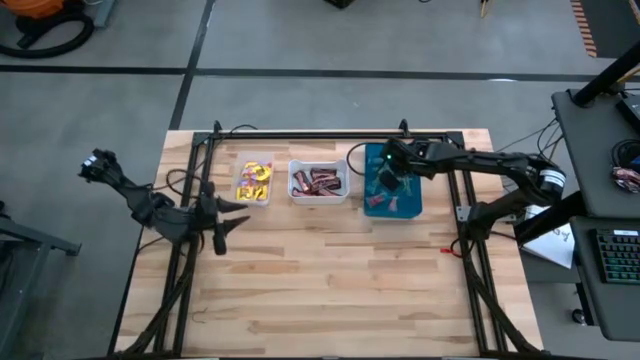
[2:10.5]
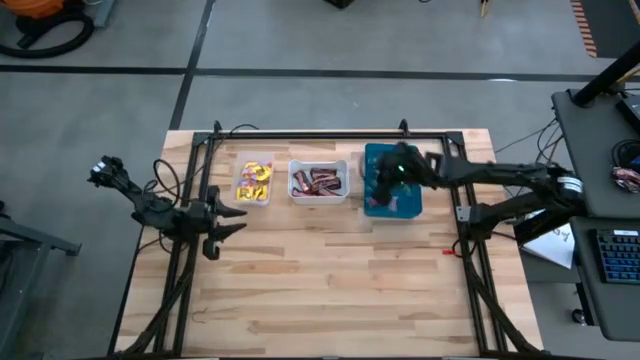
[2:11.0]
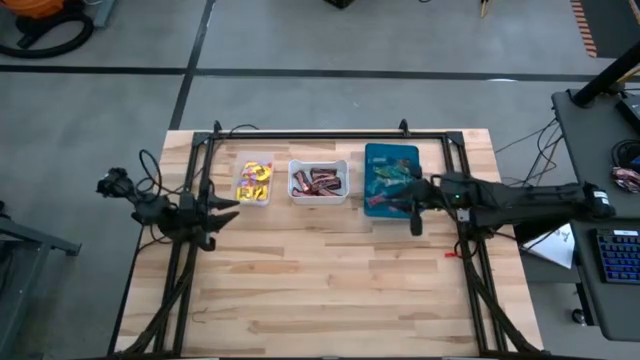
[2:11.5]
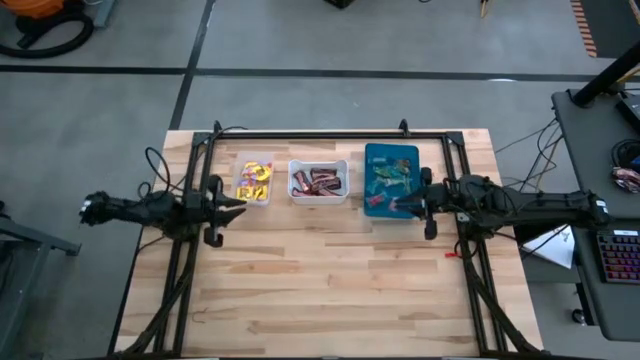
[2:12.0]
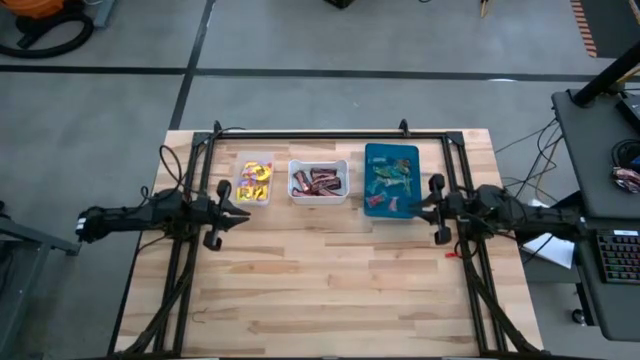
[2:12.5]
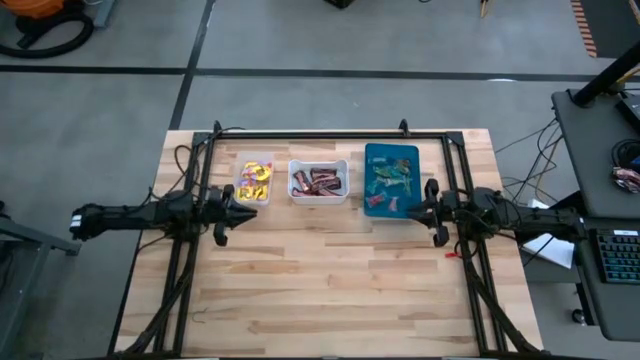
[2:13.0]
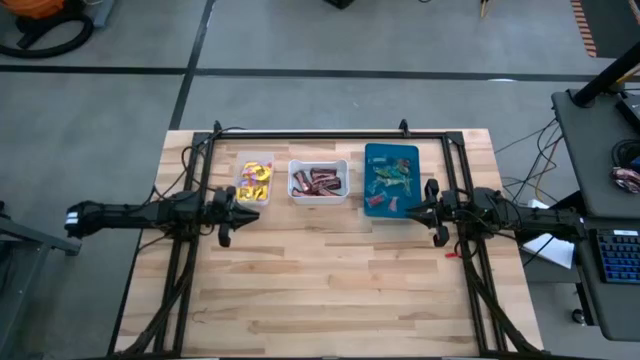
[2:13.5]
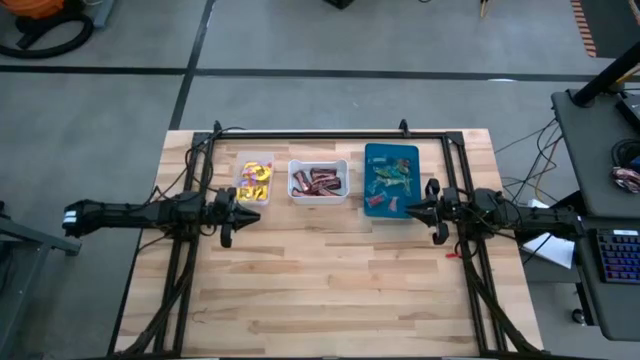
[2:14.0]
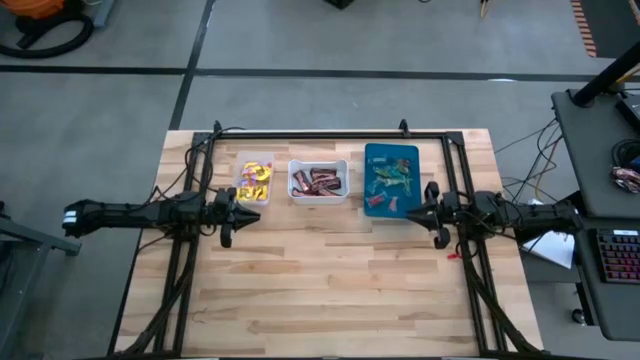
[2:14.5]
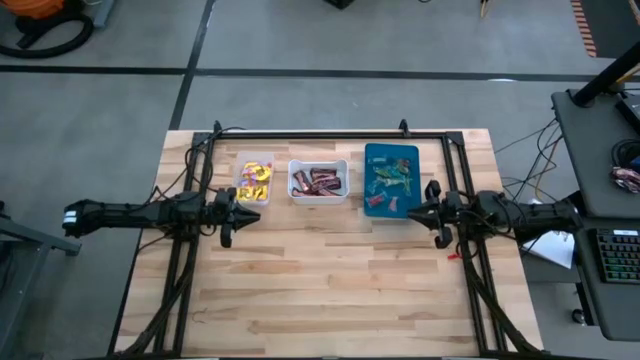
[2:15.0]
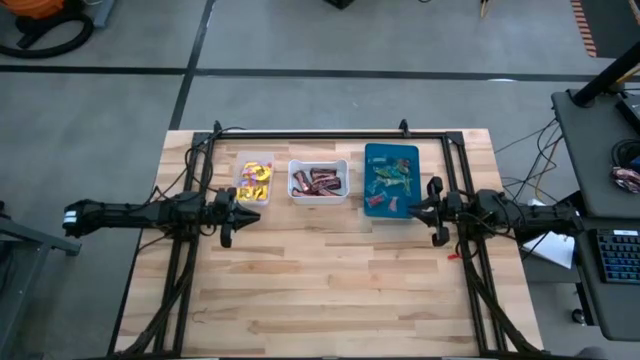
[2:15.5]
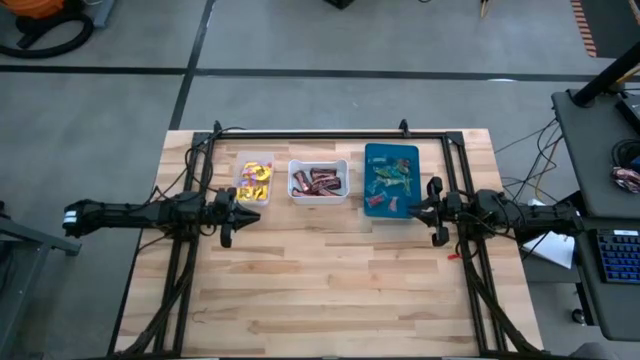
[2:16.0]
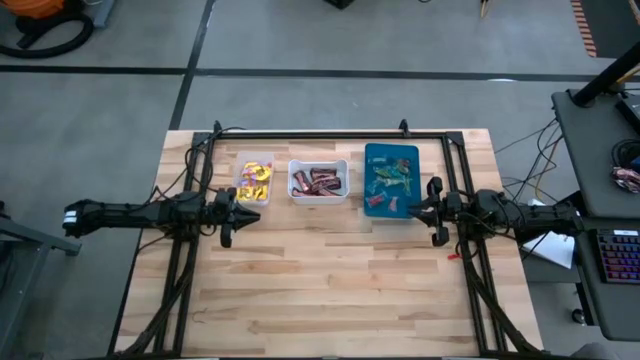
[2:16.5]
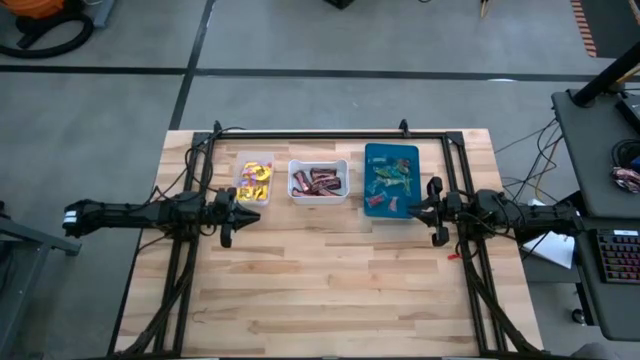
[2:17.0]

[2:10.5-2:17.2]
Task: Sort candy
Return to Home Position

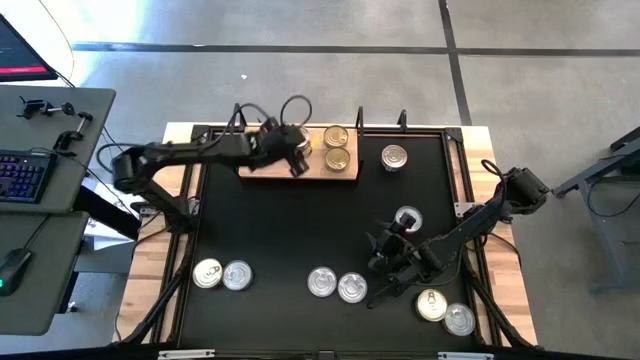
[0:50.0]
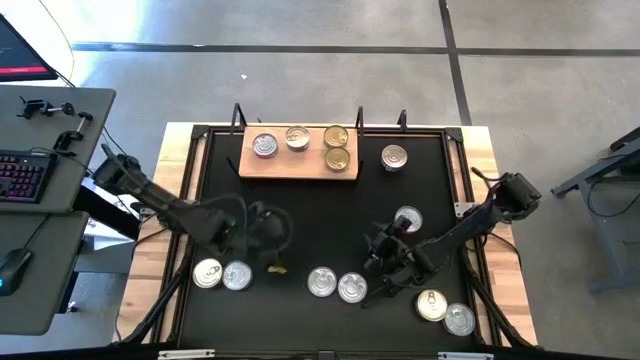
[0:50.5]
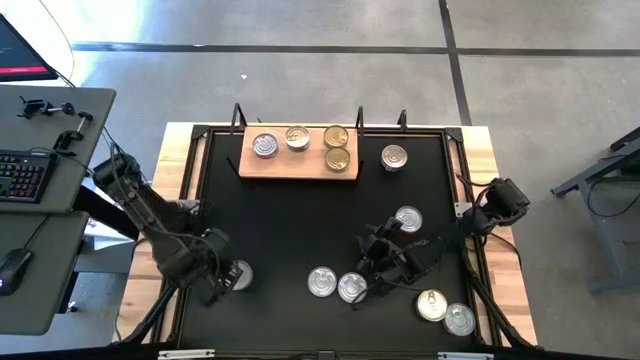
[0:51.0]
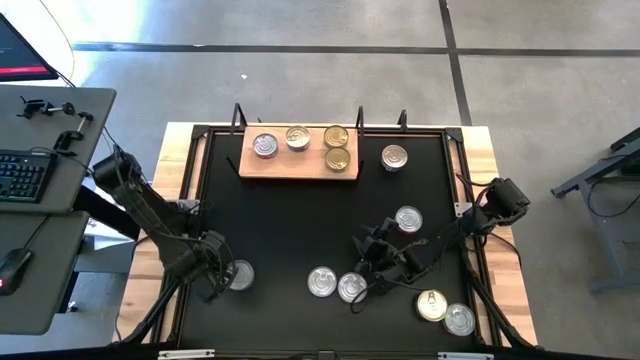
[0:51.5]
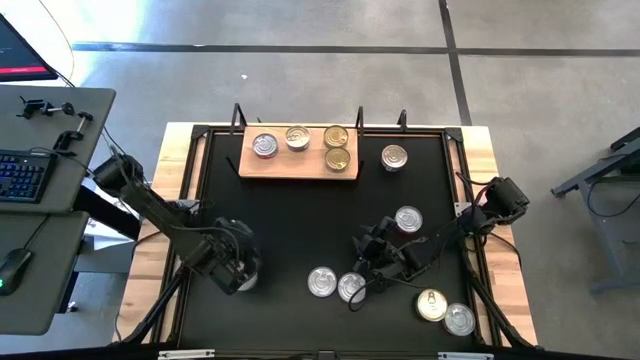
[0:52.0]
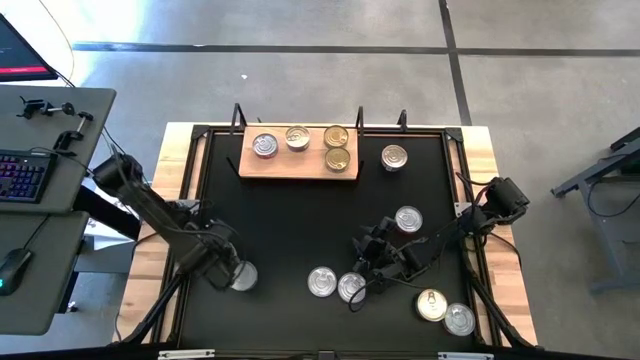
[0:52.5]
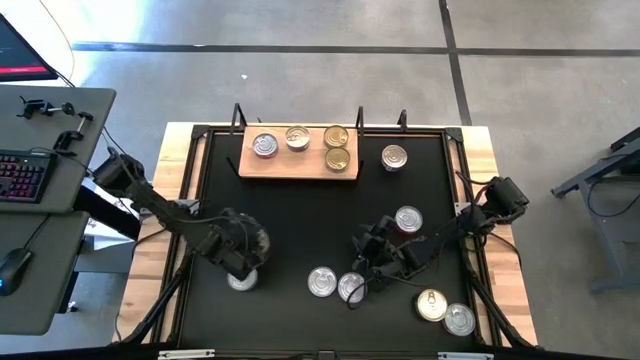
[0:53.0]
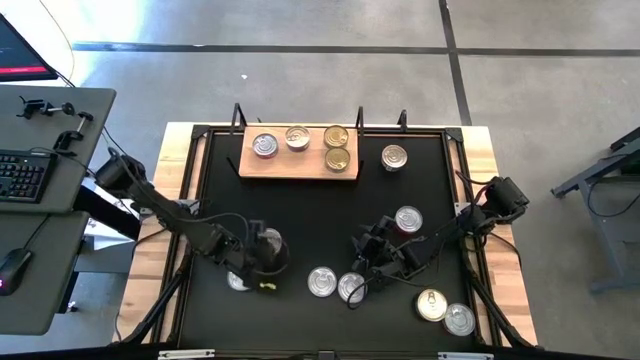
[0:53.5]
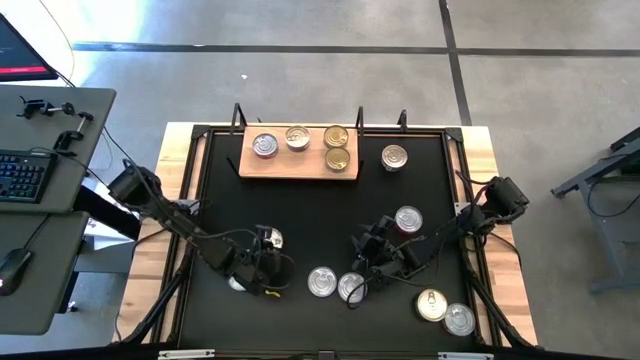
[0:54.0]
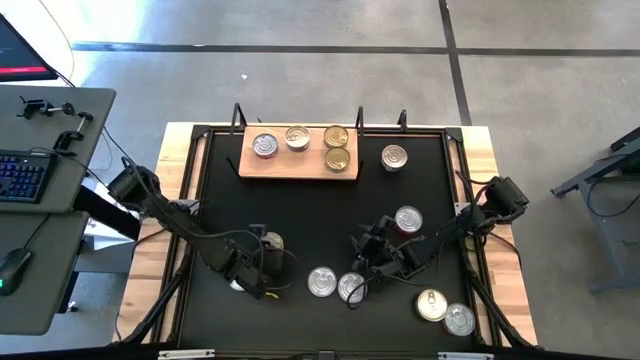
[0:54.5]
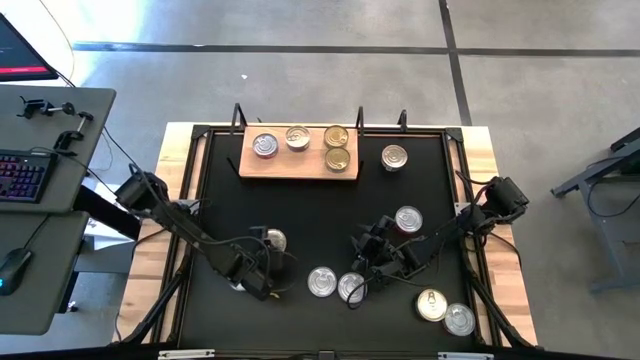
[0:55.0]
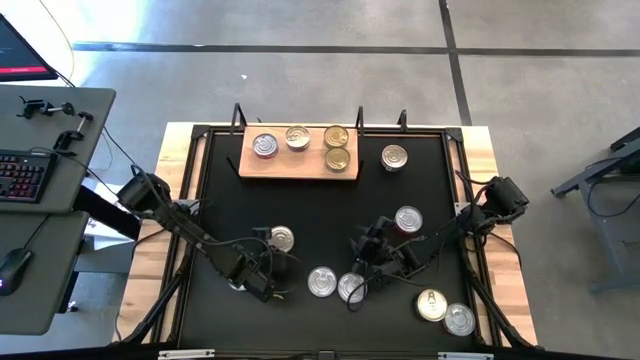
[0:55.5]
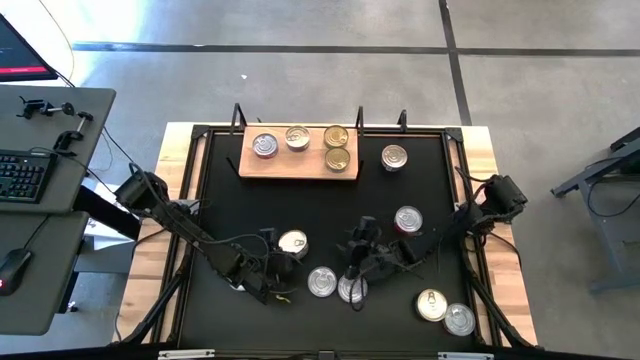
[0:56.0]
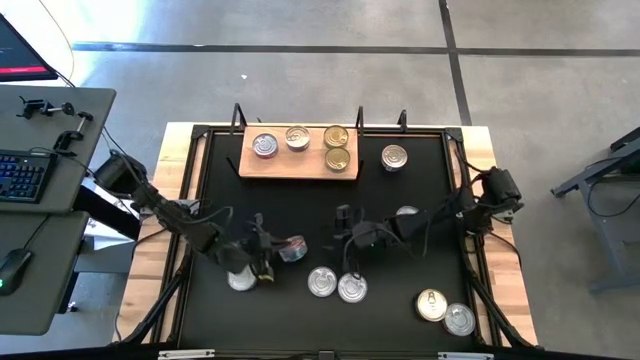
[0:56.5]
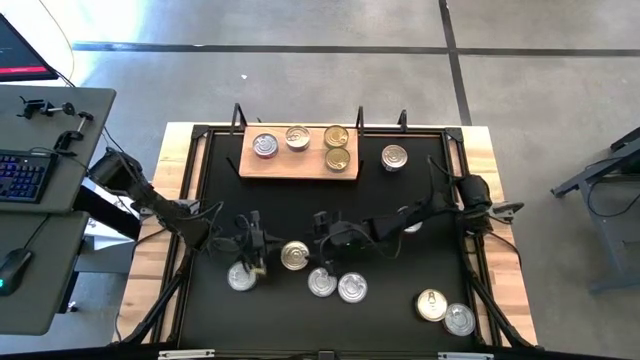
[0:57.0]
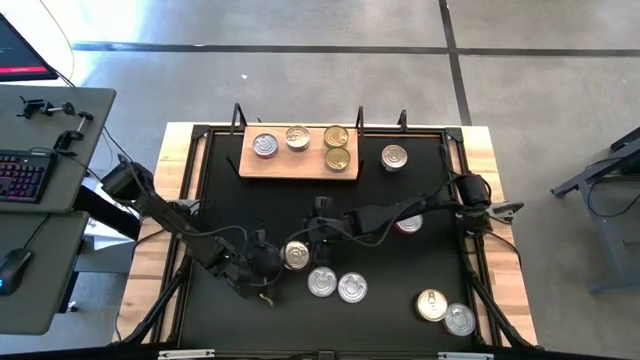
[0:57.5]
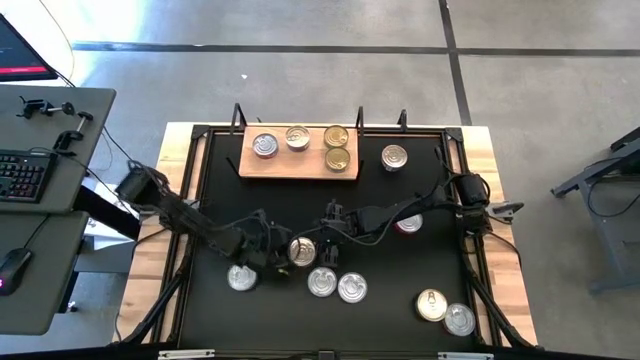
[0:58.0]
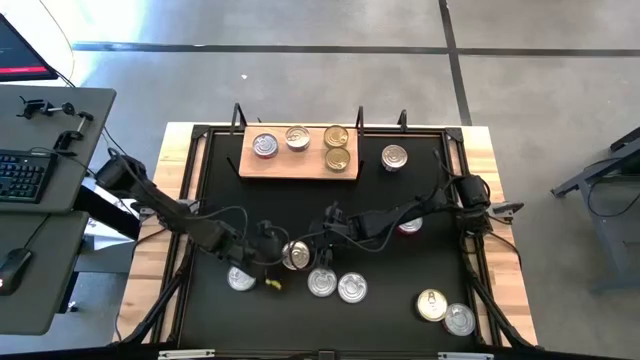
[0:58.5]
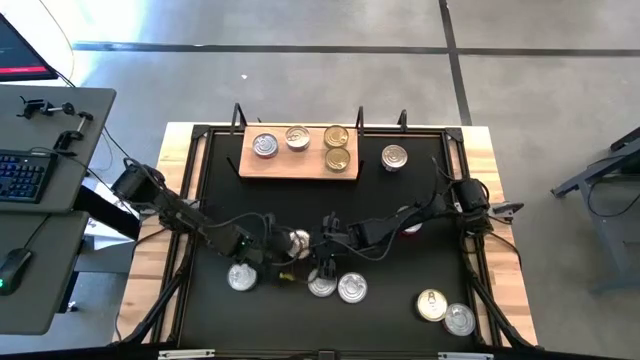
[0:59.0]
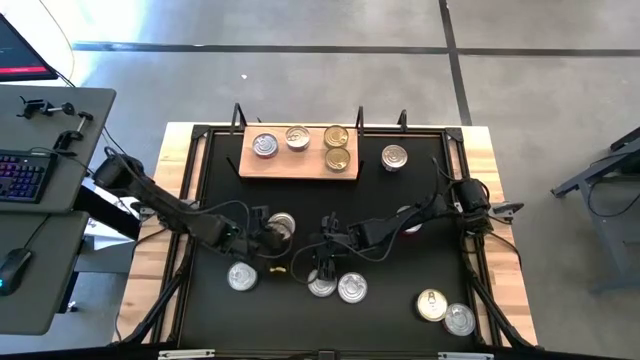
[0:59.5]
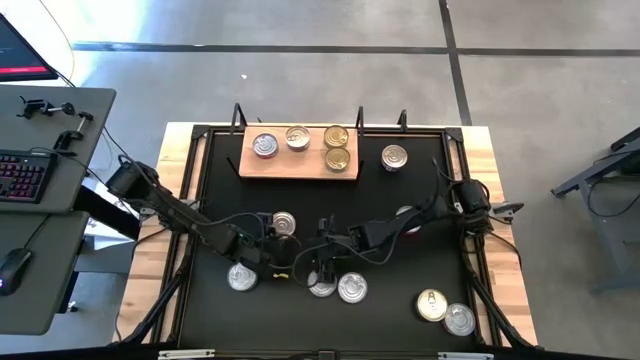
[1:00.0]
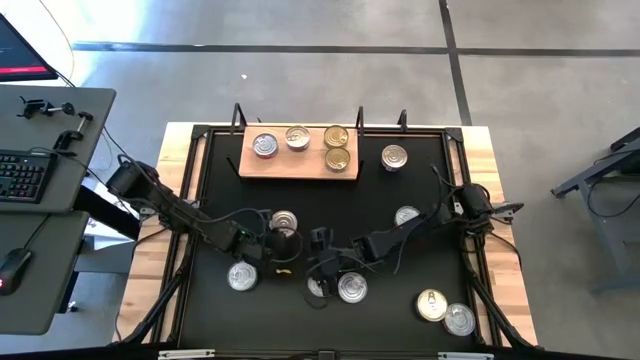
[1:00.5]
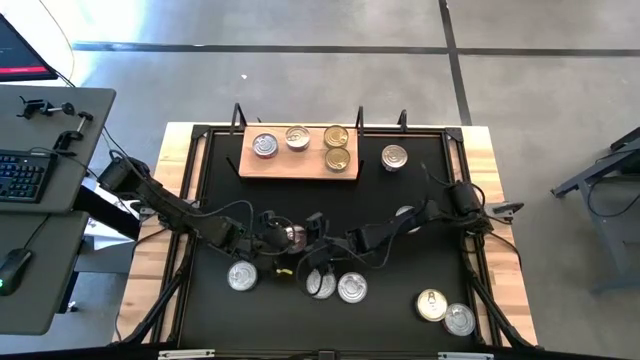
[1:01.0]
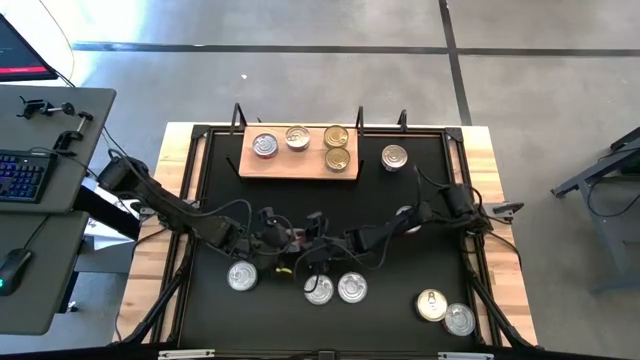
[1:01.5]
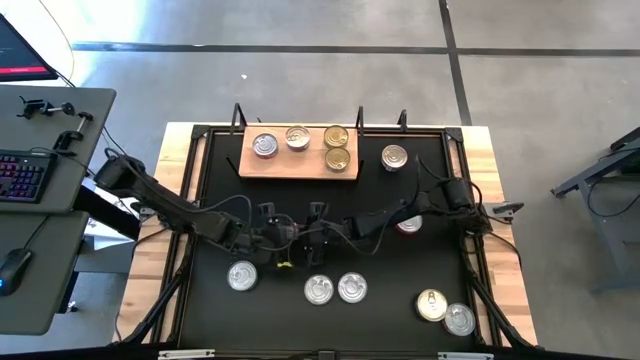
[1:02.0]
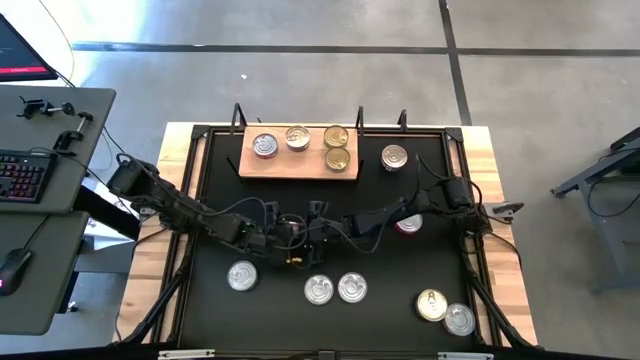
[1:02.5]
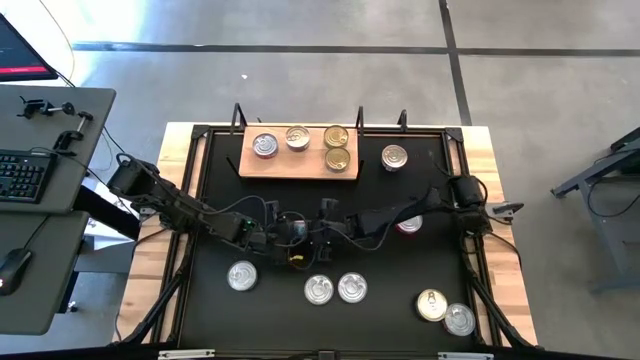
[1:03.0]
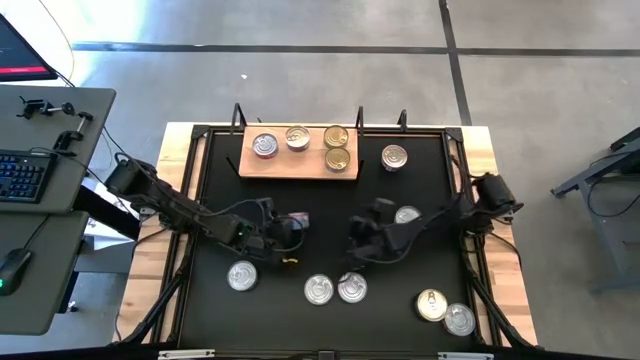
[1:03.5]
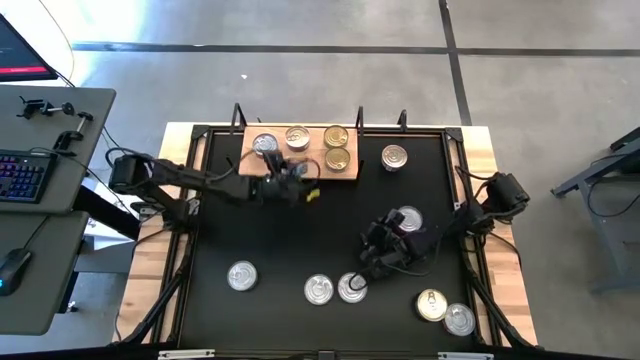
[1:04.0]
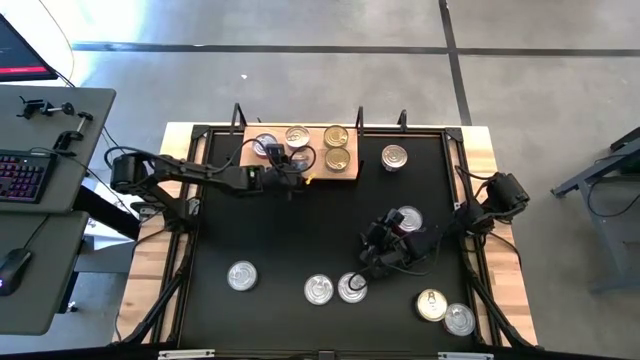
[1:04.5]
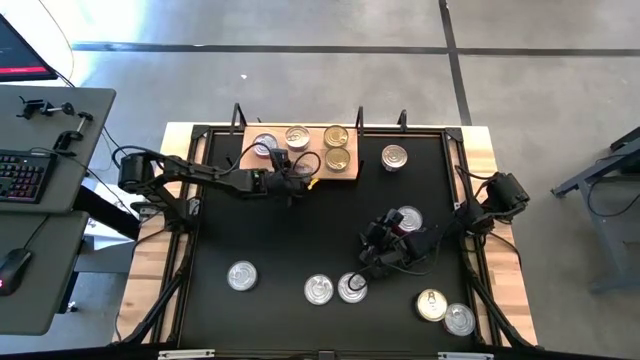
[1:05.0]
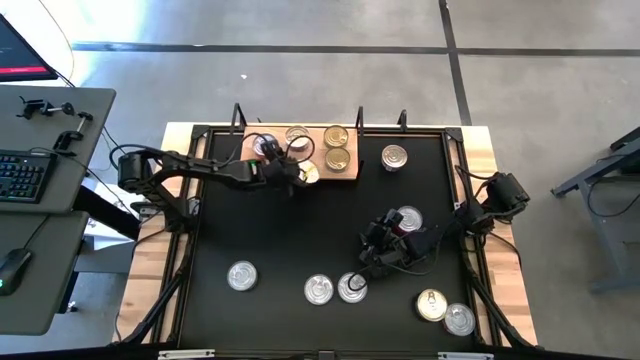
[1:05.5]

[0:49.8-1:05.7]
Task: Stack canned seafood by type on shelf
Put the blue and pink tuna can on the shelf aligned with the other blue and pink tuna can
